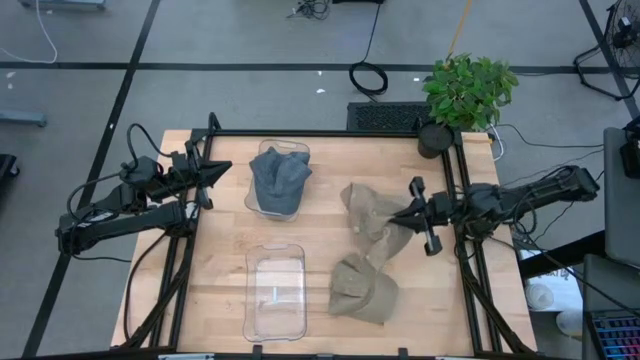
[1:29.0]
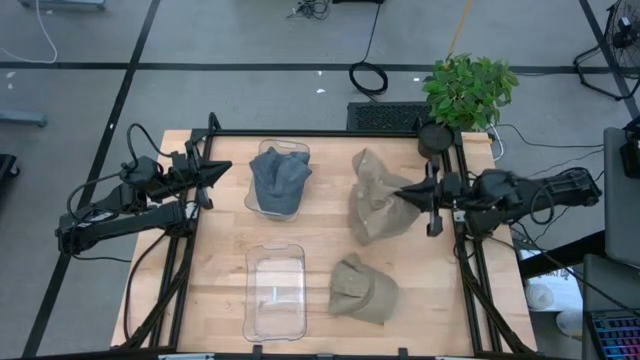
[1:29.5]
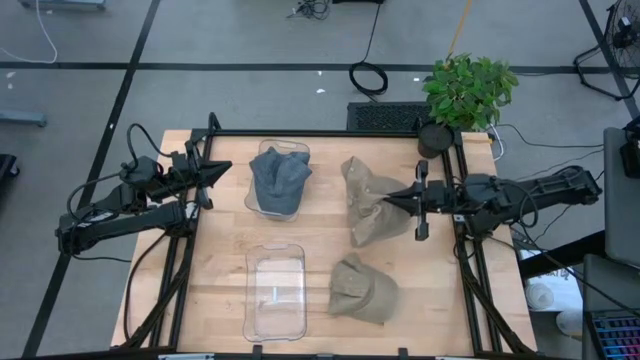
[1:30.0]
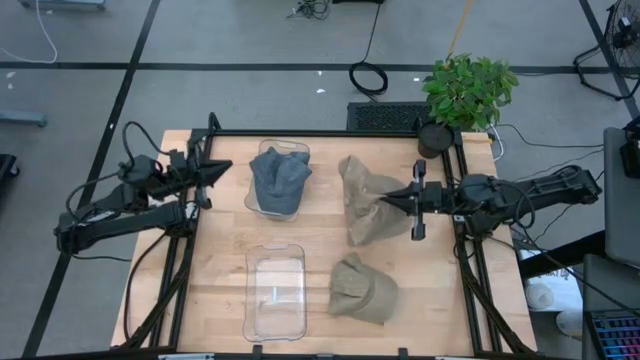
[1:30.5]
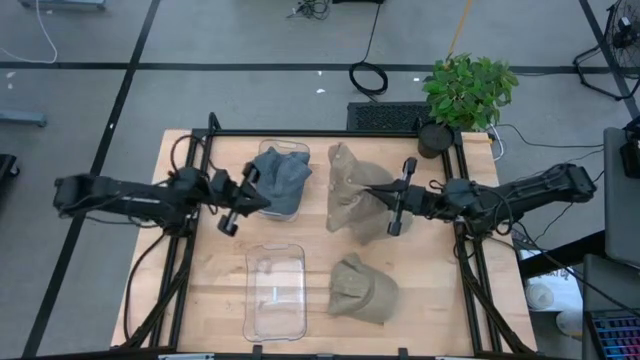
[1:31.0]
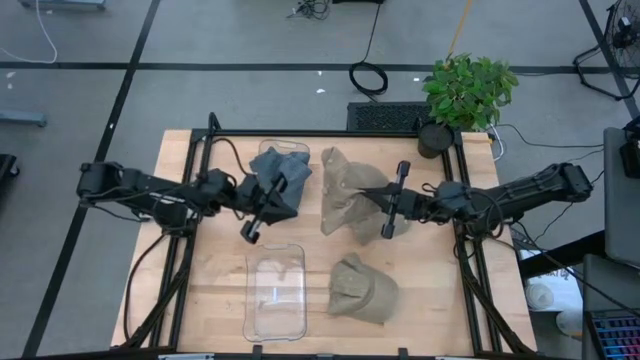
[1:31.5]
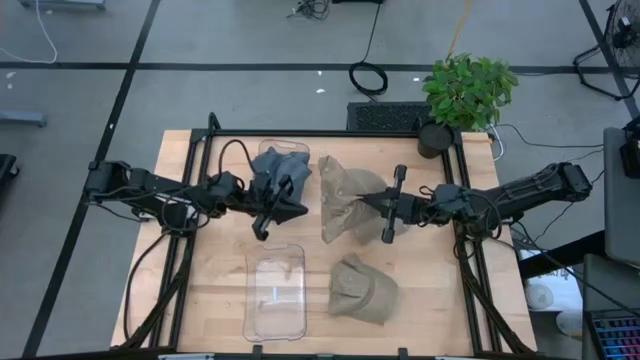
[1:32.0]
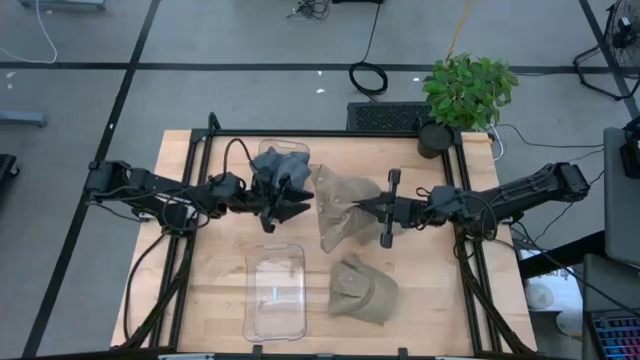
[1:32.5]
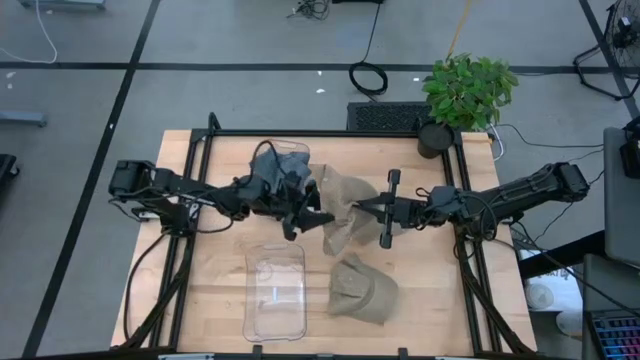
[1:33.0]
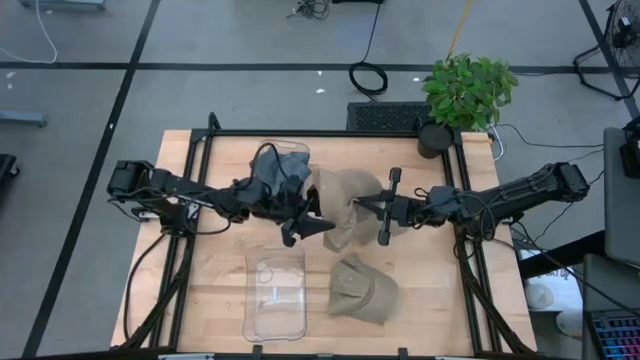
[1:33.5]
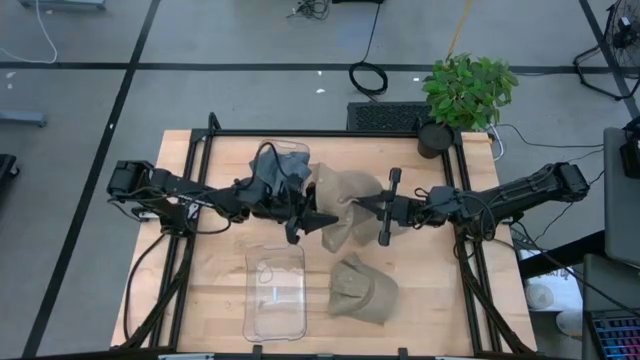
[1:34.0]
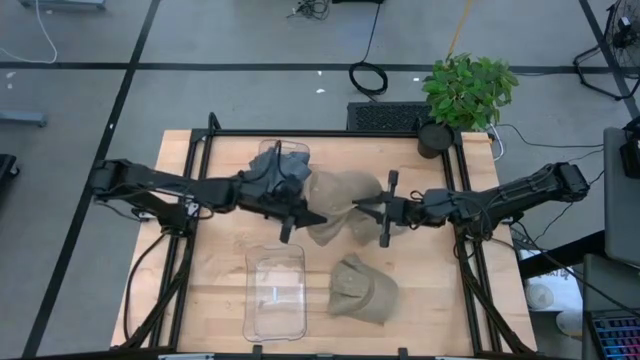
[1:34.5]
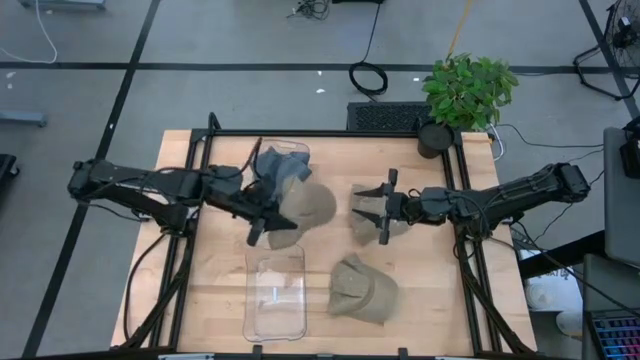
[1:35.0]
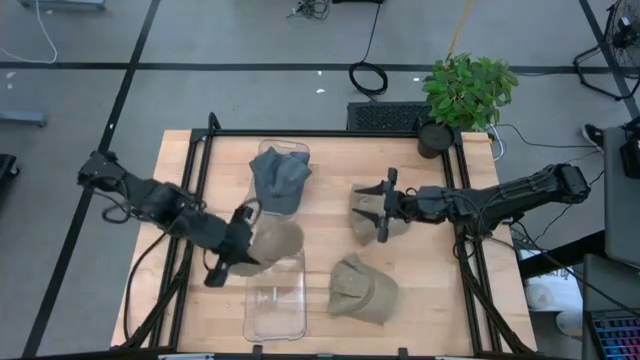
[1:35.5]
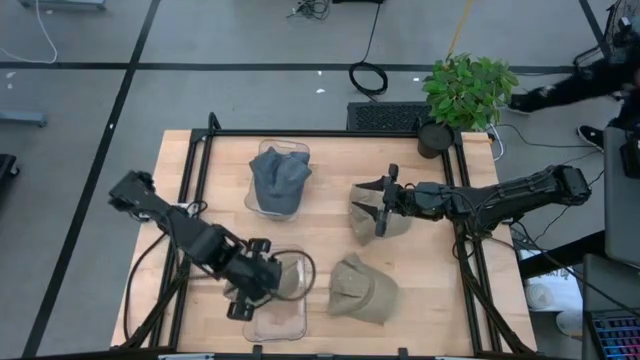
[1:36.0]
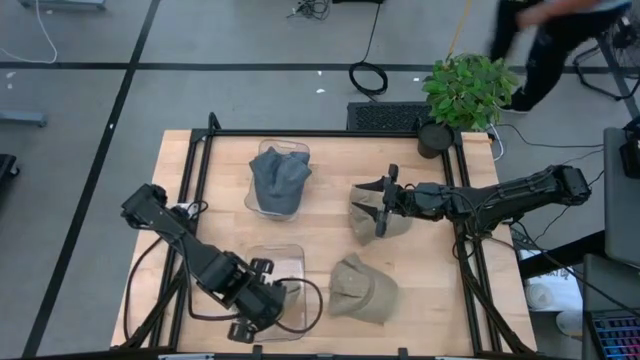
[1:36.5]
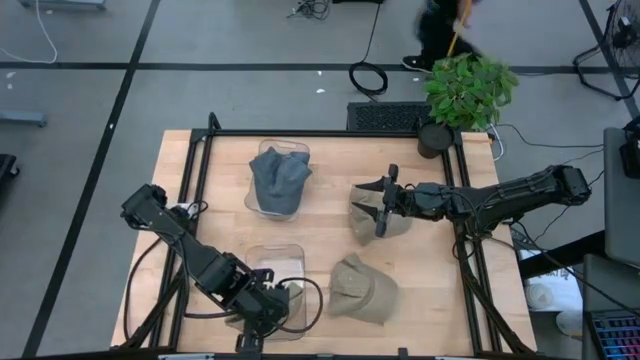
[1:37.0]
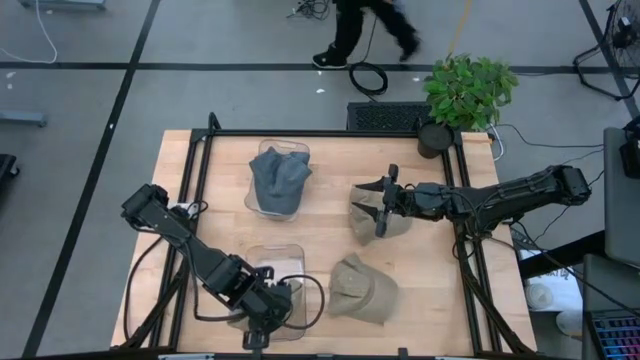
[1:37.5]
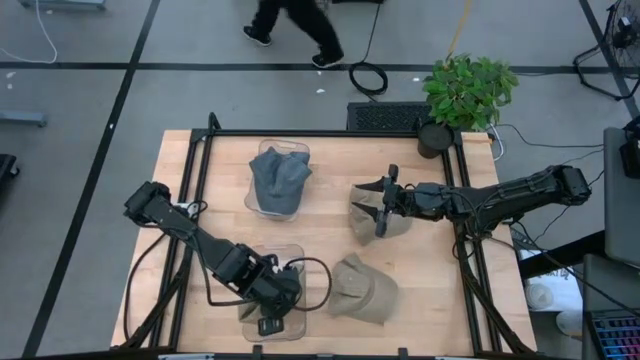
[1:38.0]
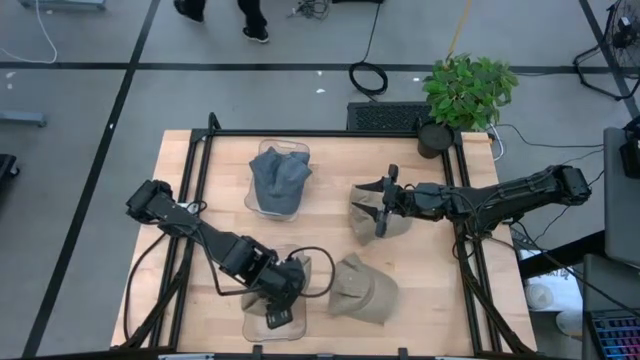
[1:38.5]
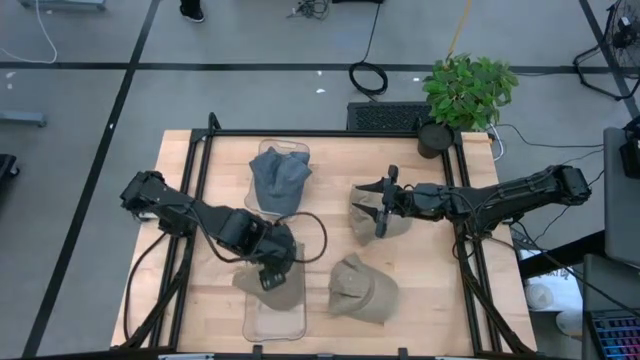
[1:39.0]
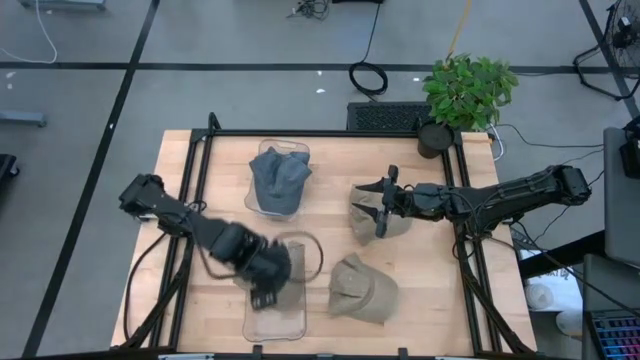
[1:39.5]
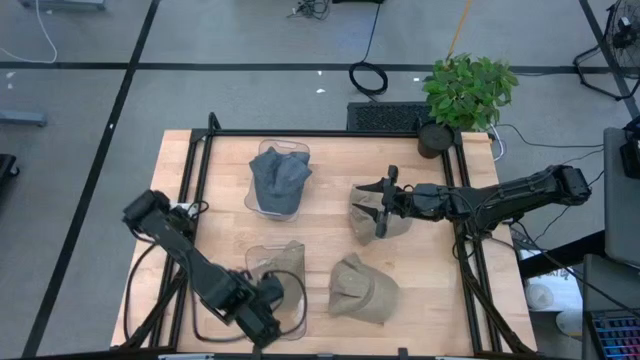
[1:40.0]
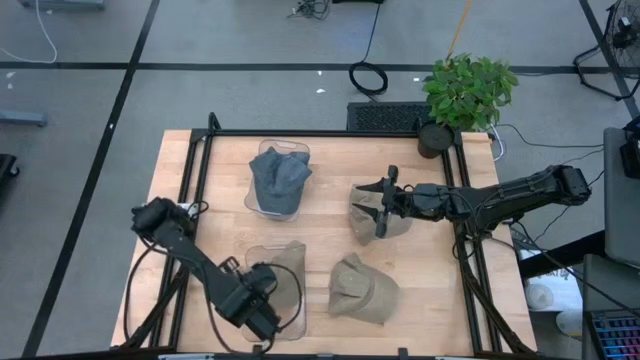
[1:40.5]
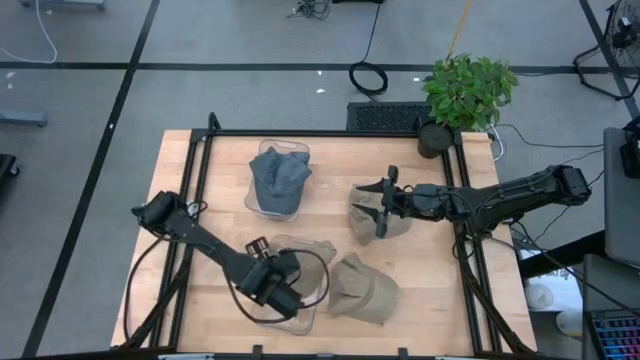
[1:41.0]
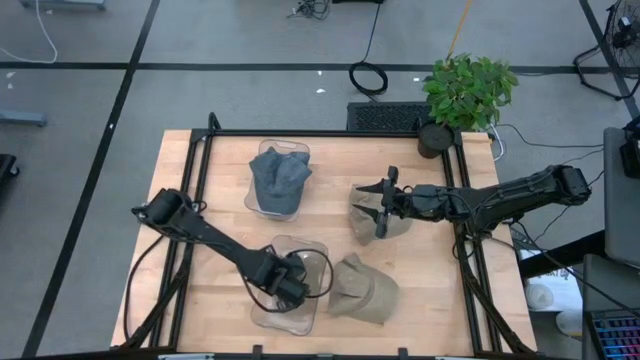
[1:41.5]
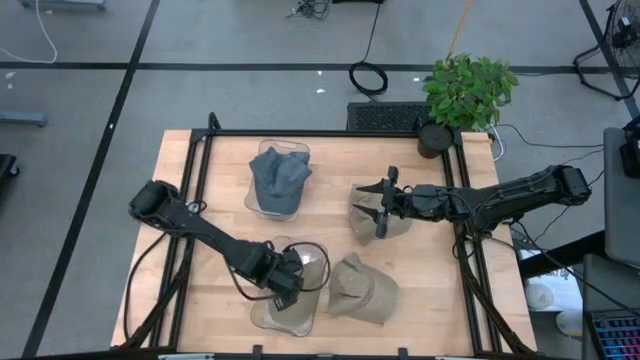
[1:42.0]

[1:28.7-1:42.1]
Task: Stack caps by color
Put the top brown cap into the bottom transparent bin

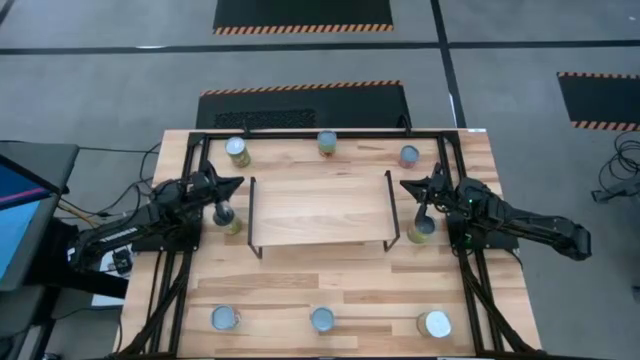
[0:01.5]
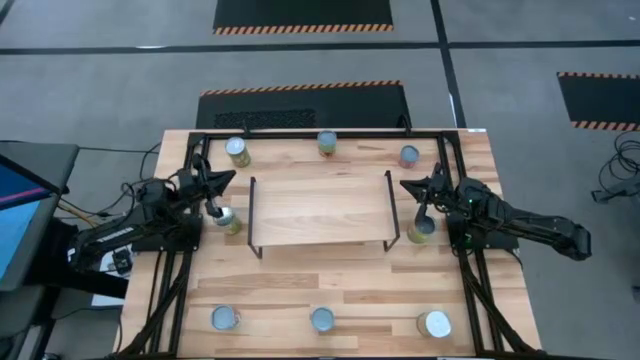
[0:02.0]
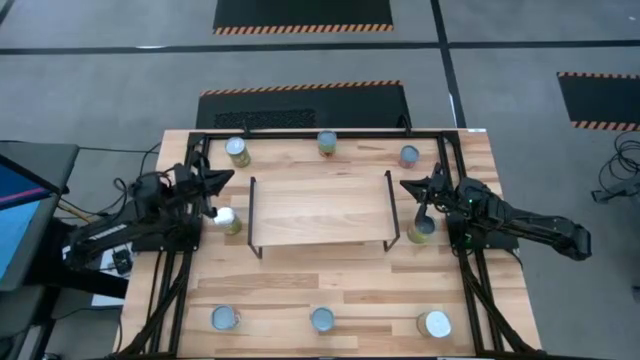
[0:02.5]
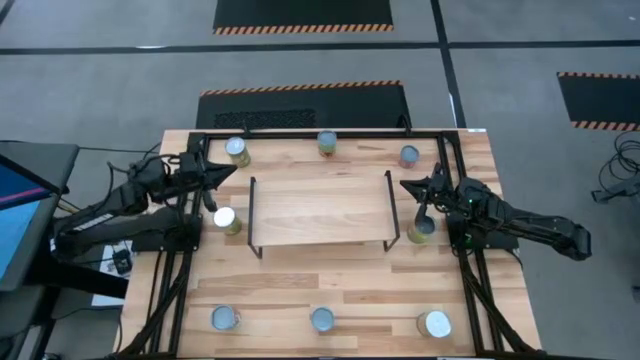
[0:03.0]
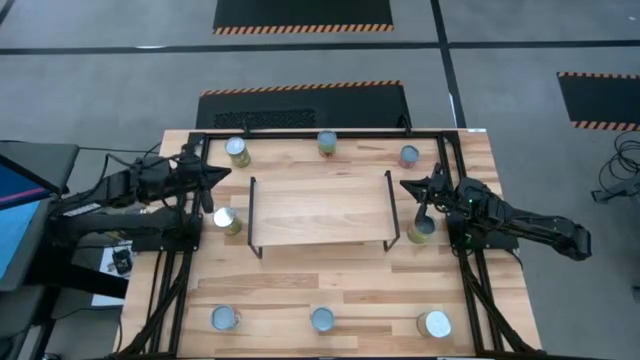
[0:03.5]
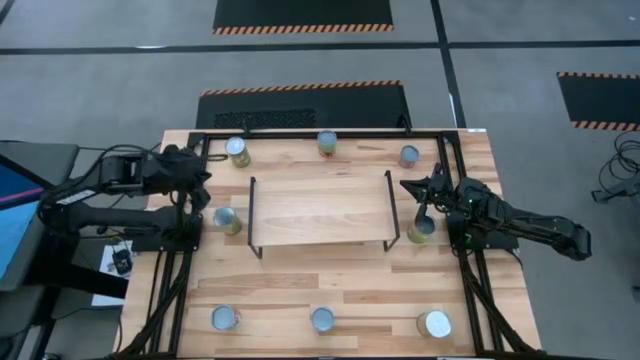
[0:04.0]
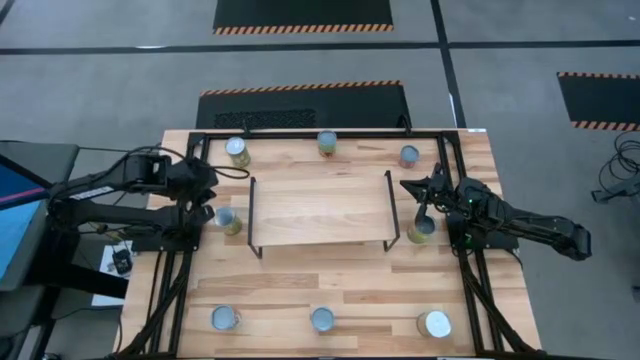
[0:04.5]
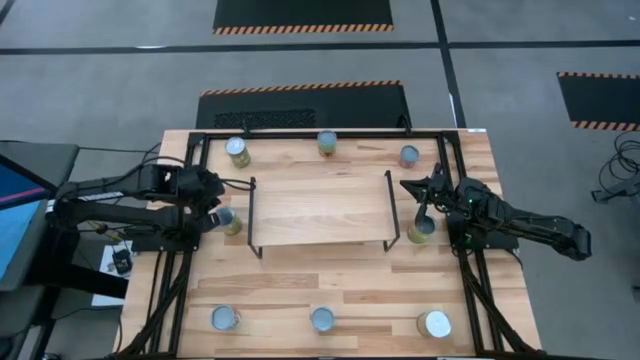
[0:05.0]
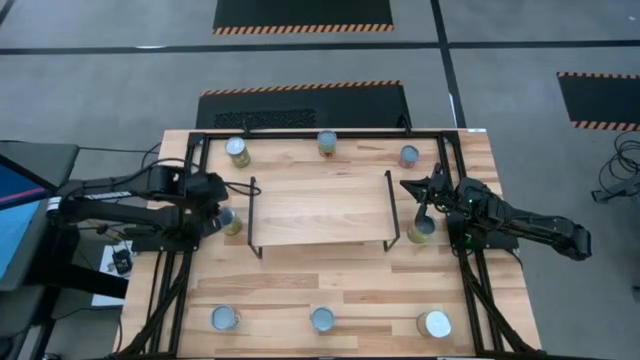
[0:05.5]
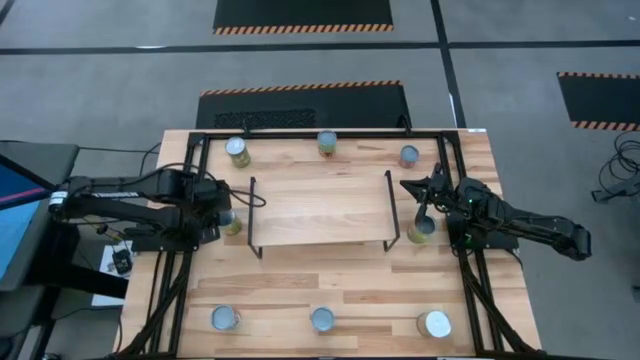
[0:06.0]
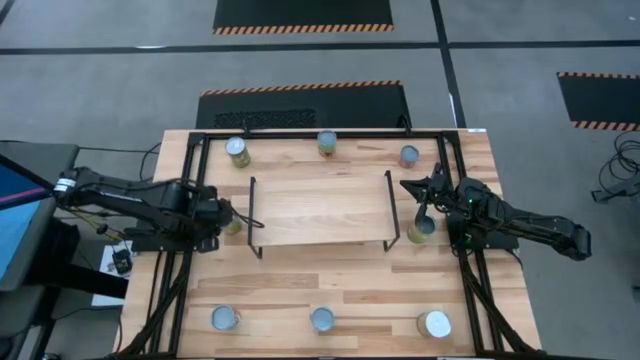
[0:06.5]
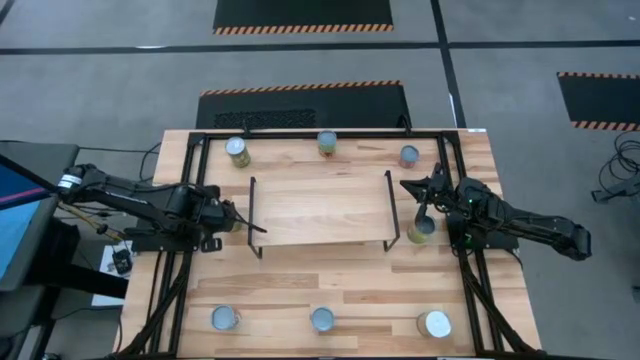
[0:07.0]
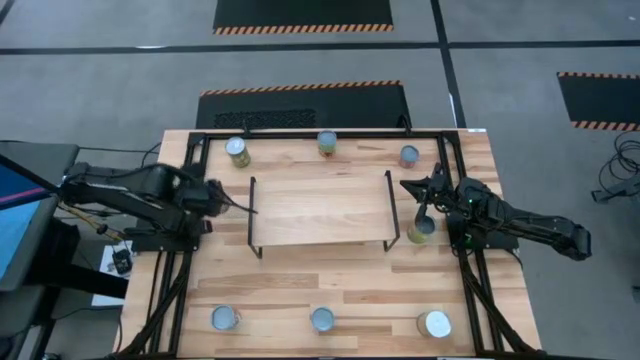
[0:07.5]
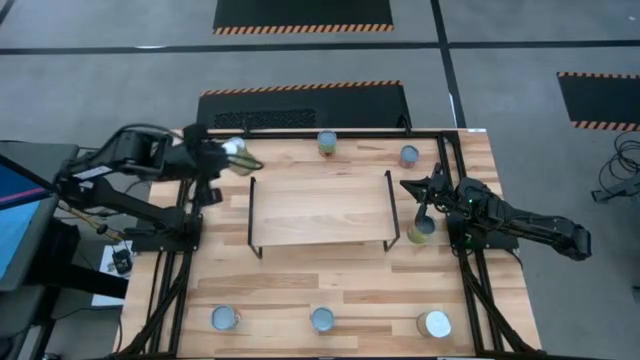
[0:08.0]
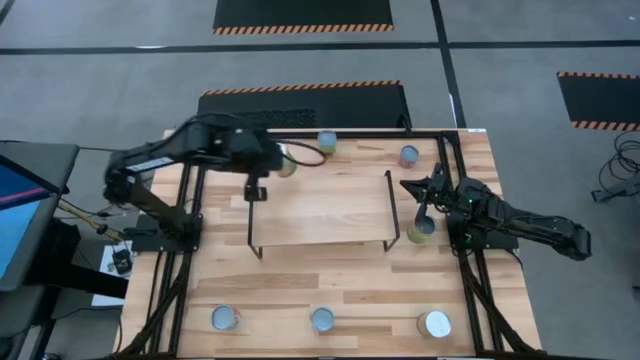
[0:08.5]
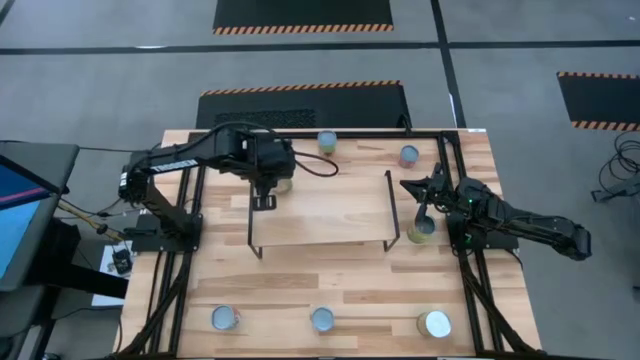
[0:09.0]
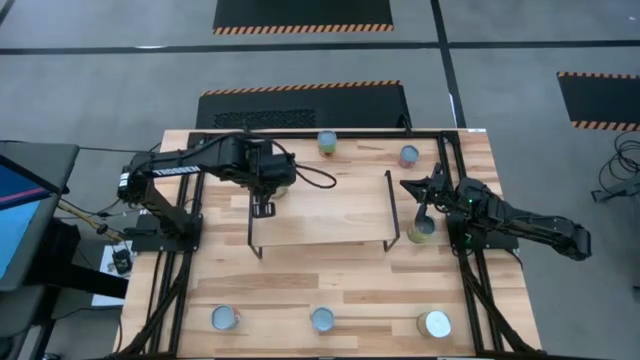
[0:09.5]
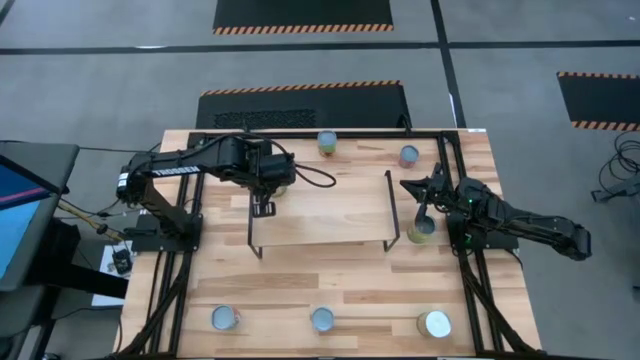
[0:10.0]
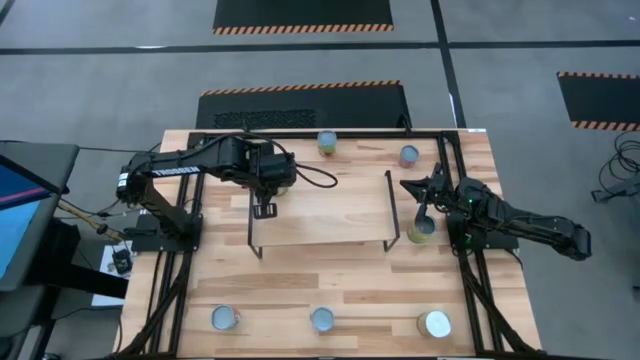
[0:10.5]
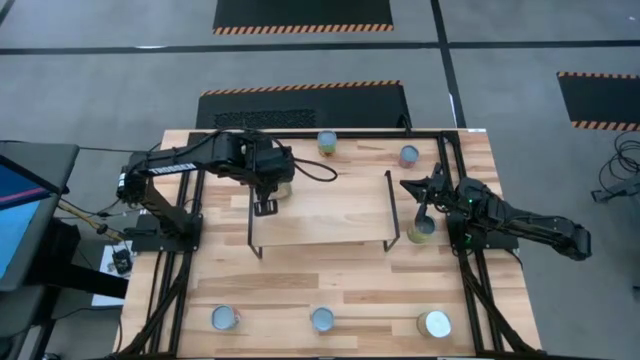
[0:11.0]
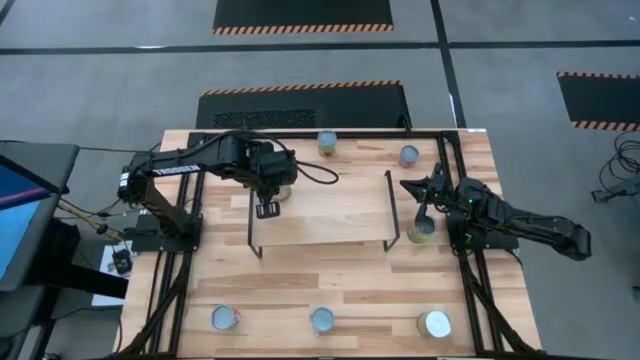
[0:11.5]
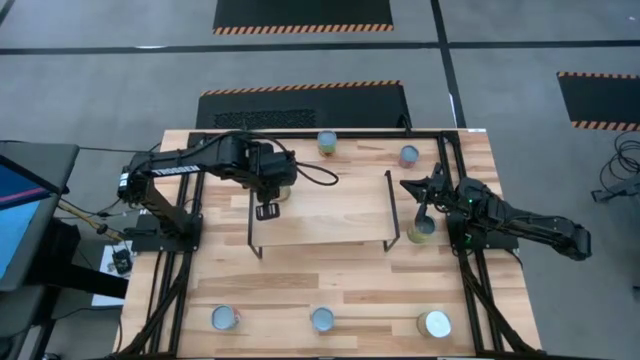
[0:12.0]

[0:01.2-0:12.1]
Task: Pick and place cans onto a shelf
Put the top canned orange on the shelf
